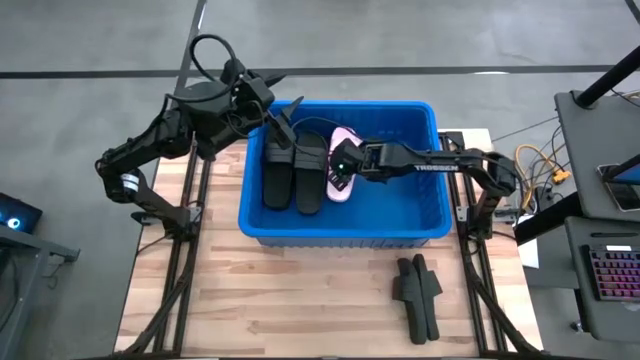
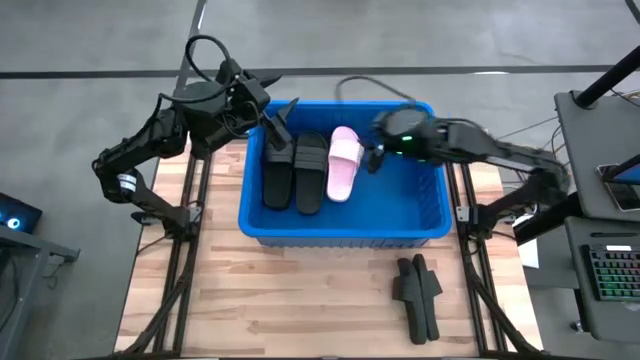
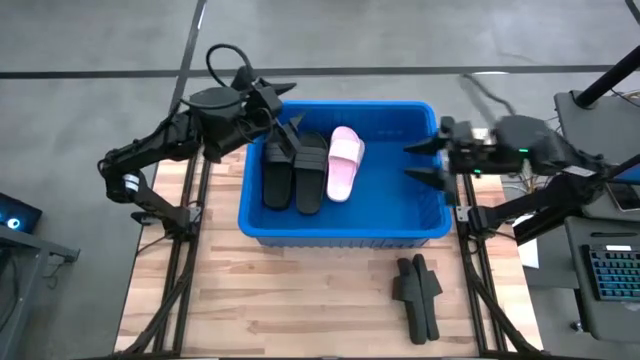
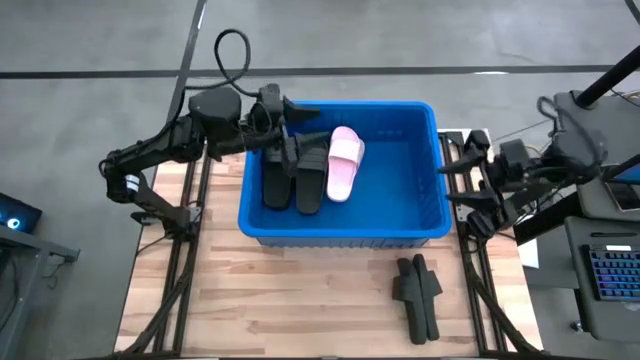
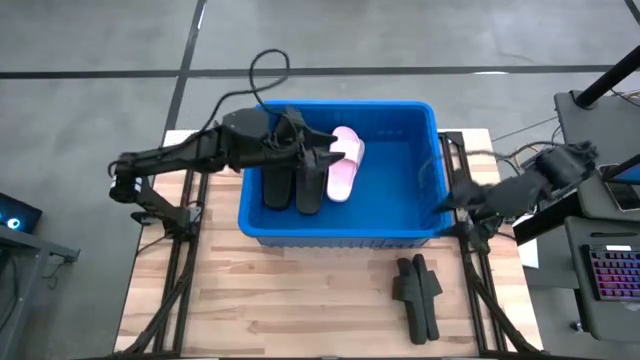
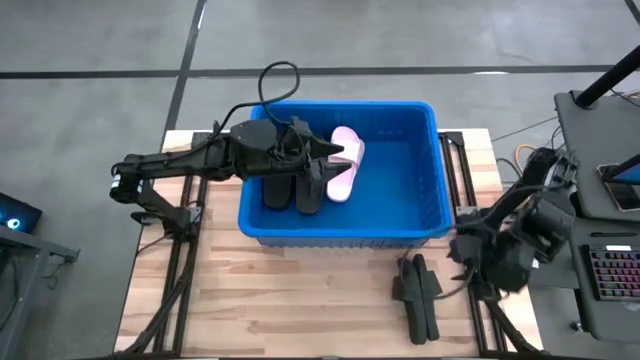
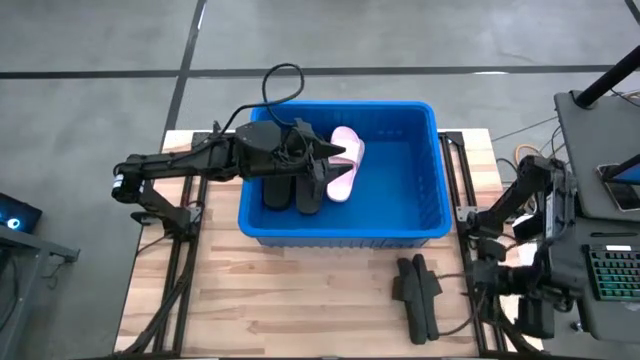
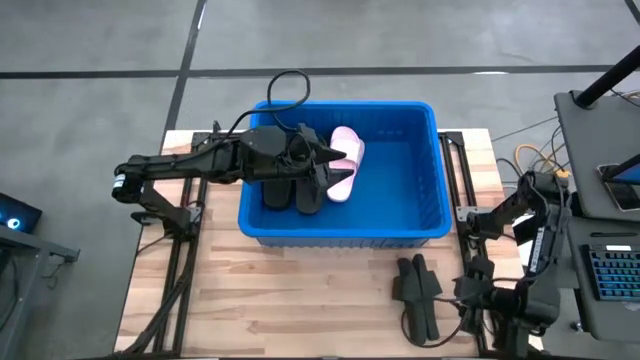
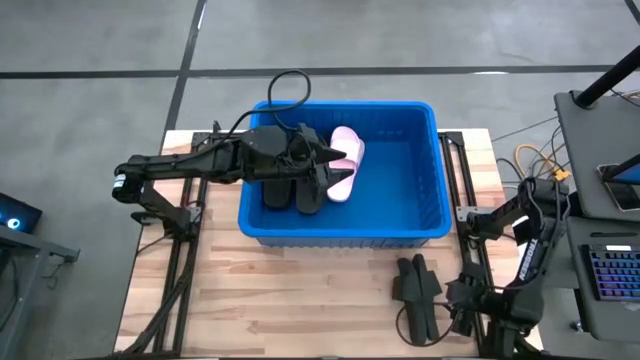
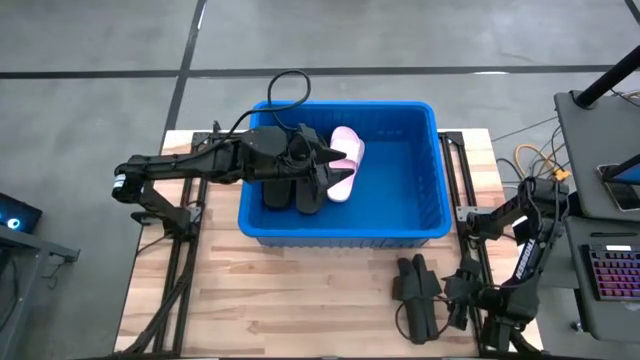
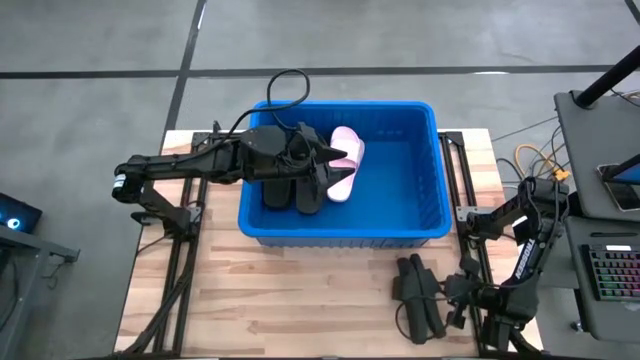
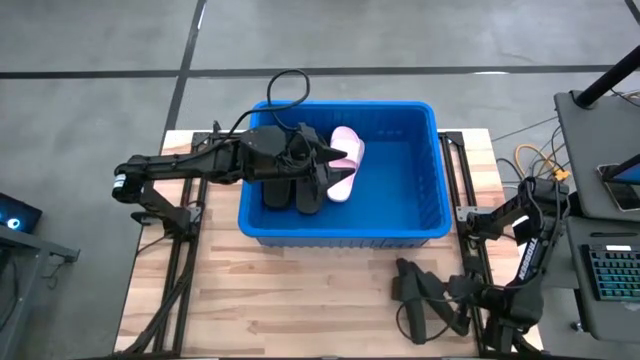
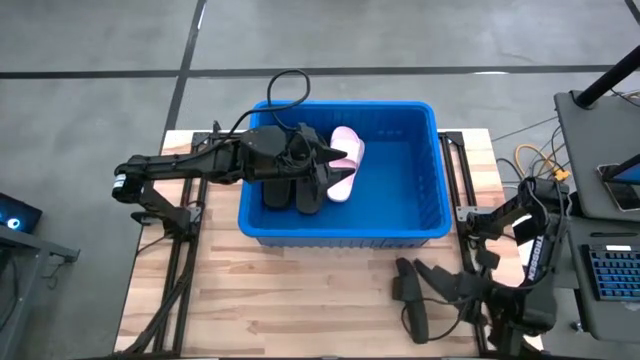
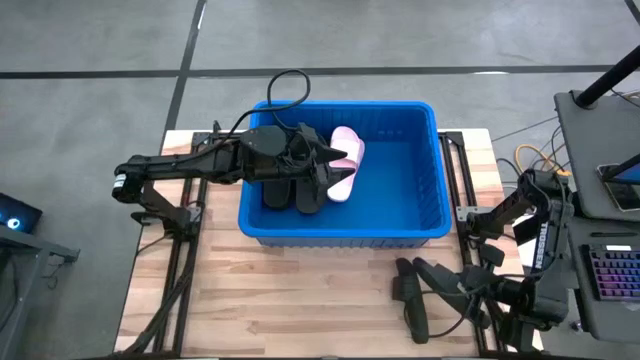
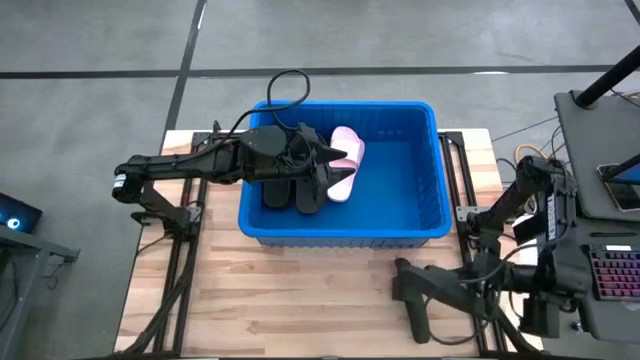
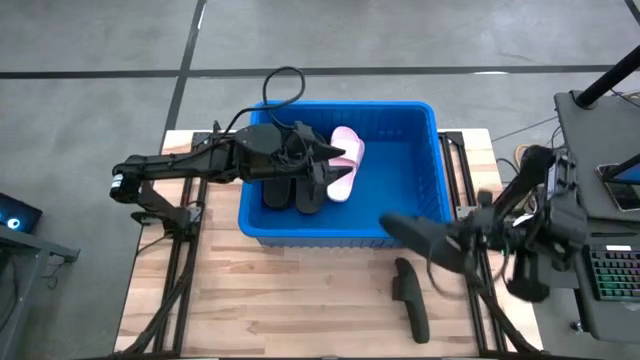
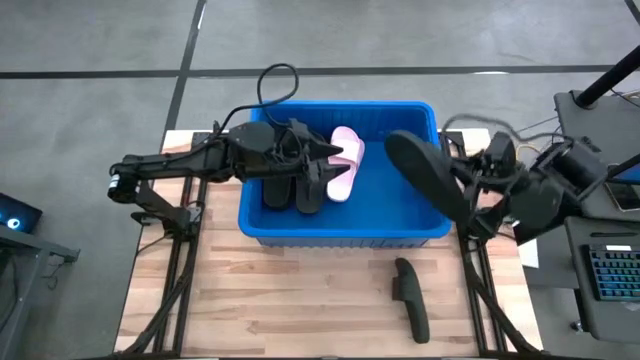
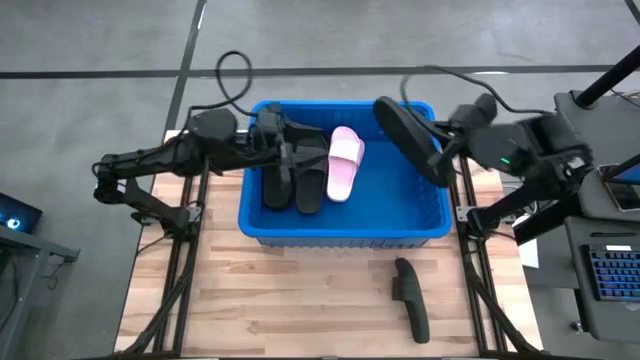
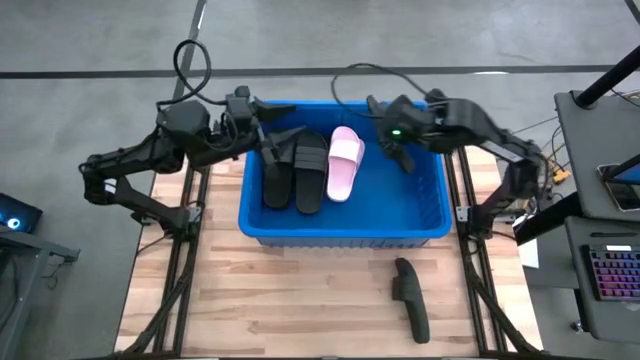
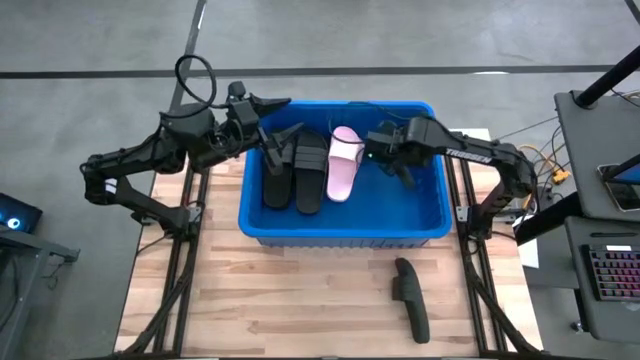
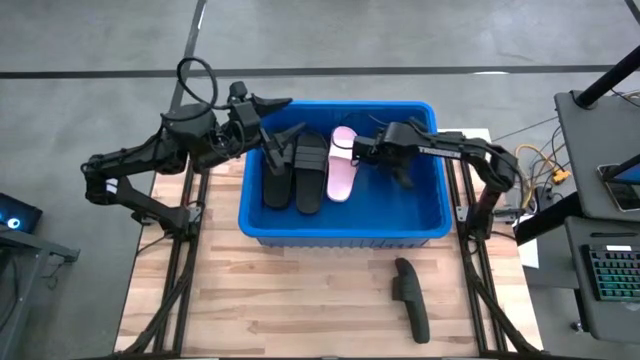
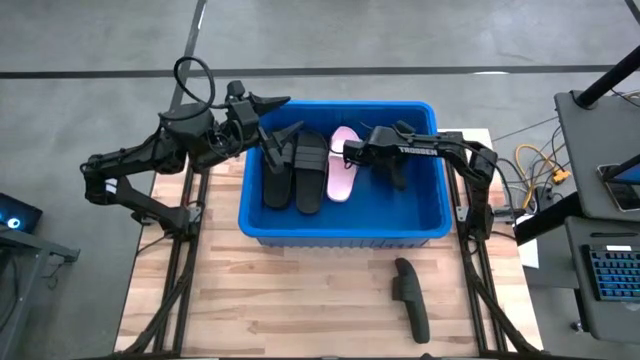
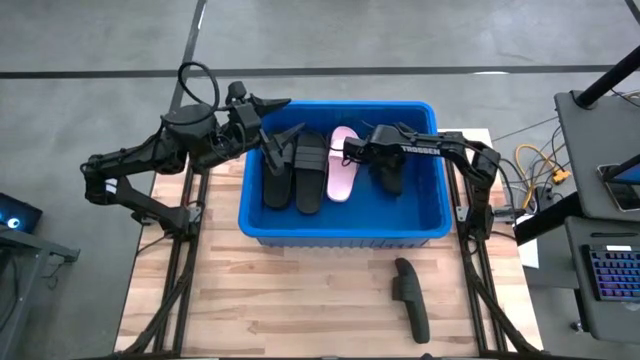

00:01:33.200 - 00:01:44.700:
Task: Pick and place slides into bin
Put the black slides into the blue bin

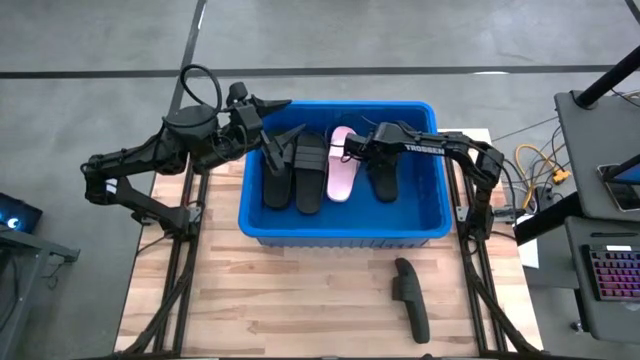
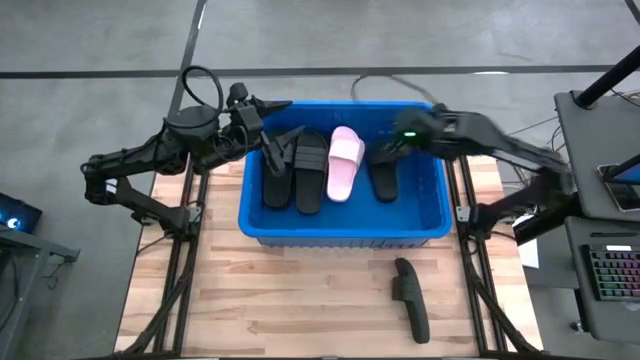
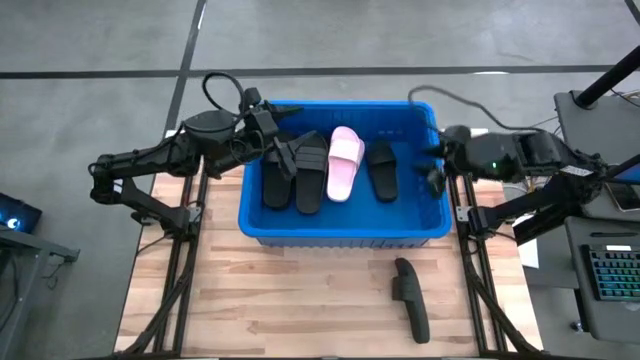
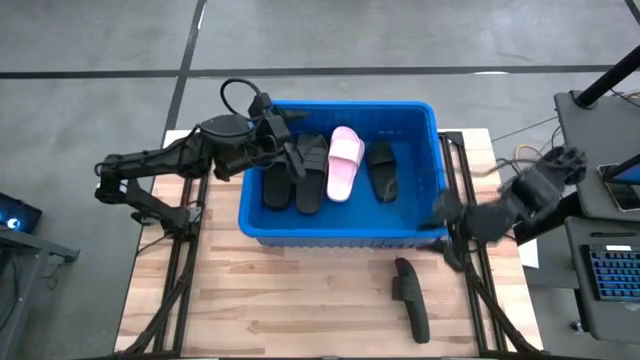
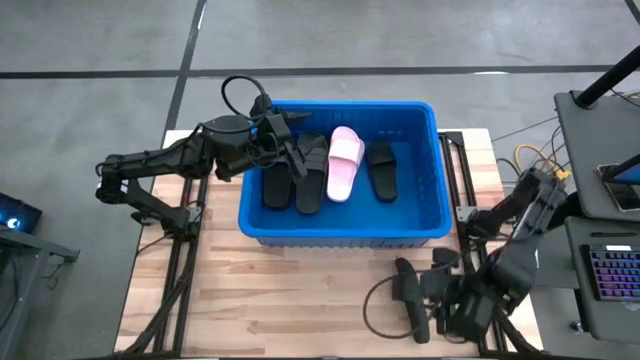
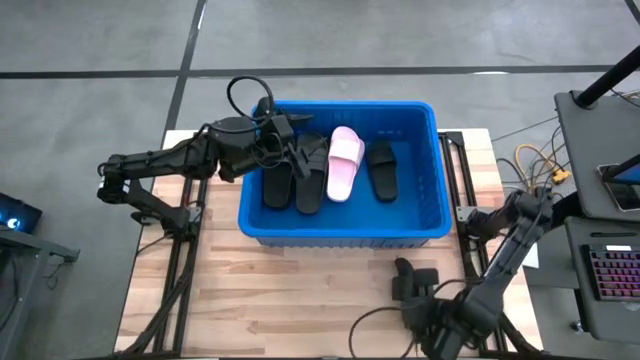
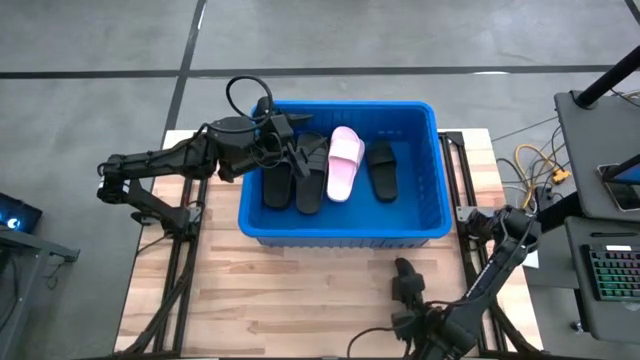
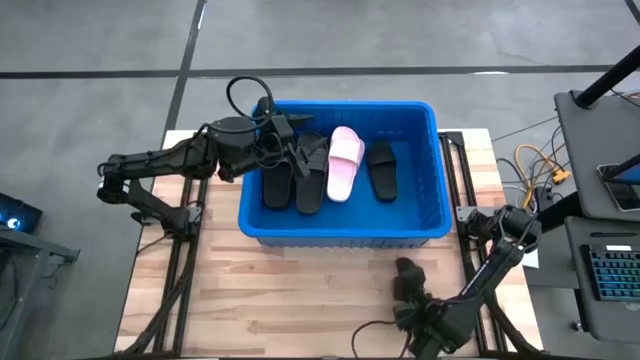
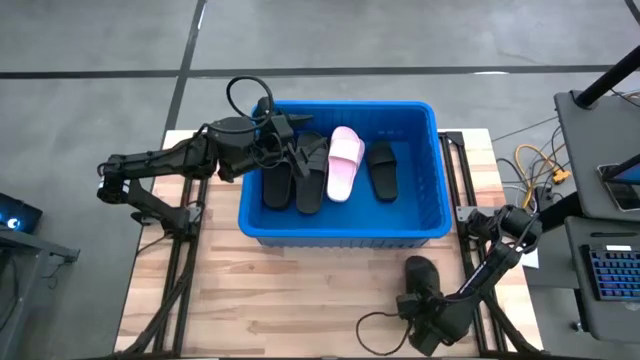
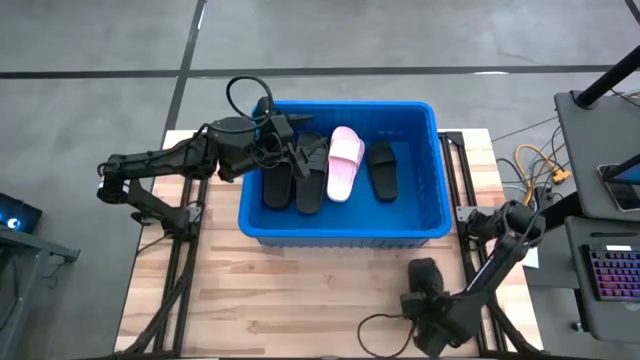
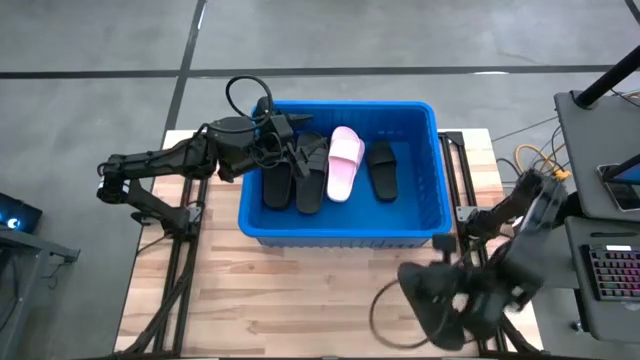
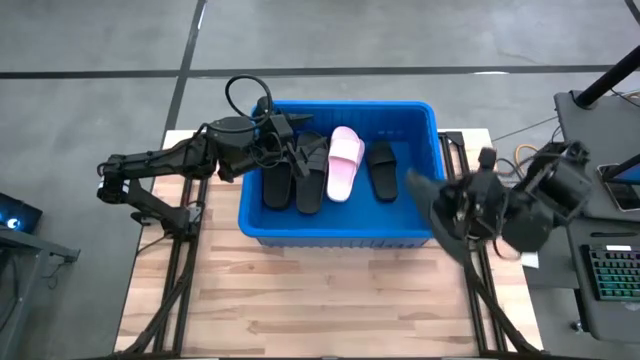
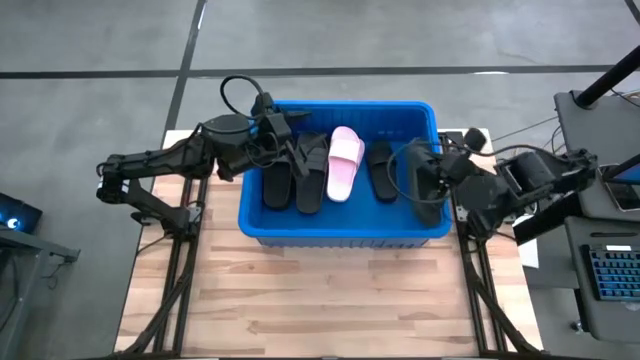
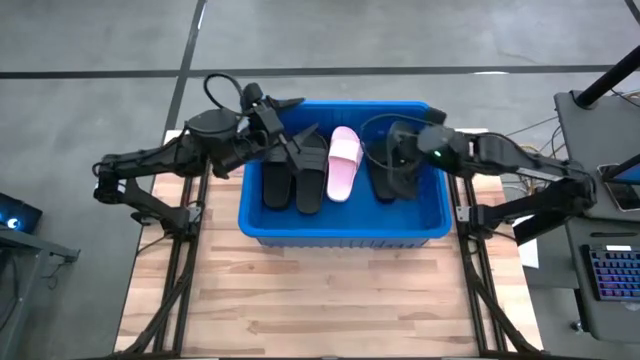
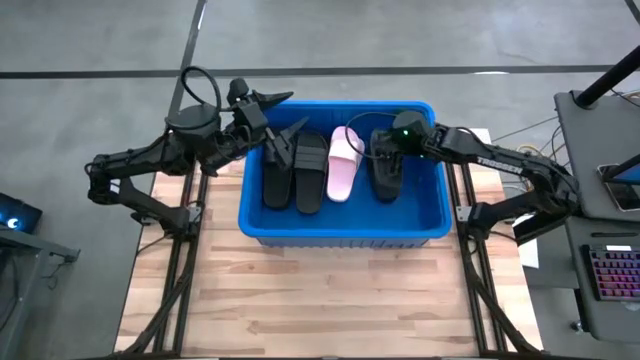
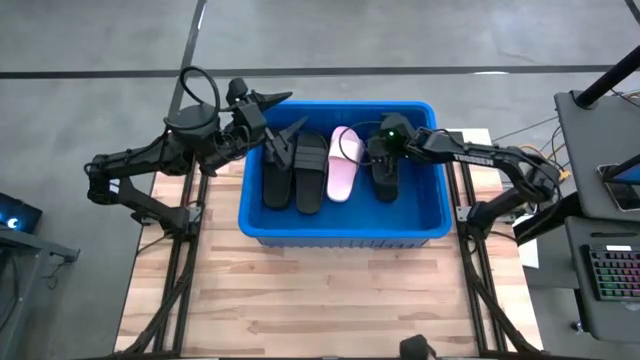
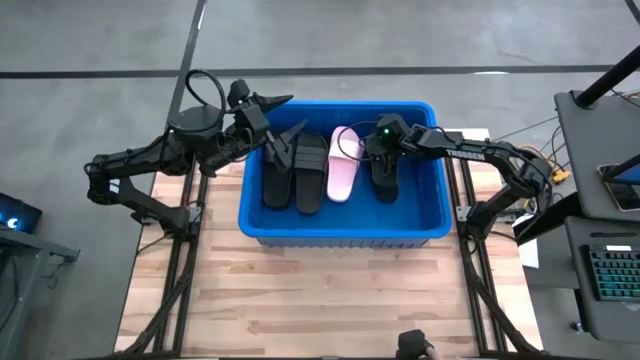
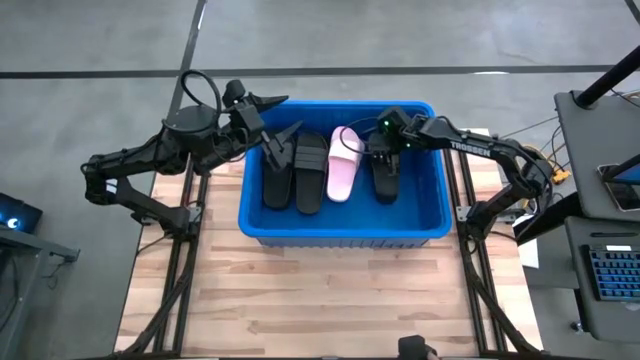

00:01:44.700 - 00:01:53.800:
Put the black slides into the blue bin
